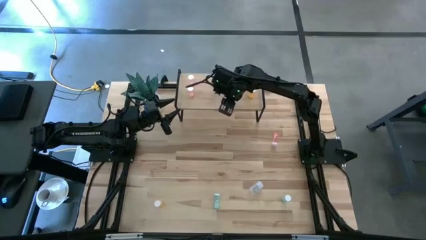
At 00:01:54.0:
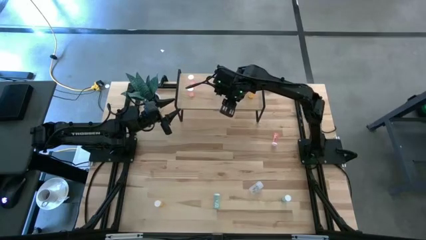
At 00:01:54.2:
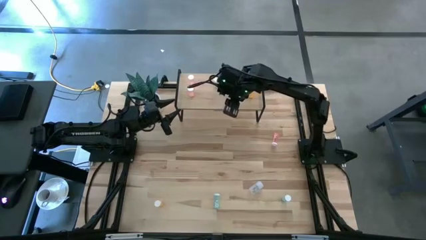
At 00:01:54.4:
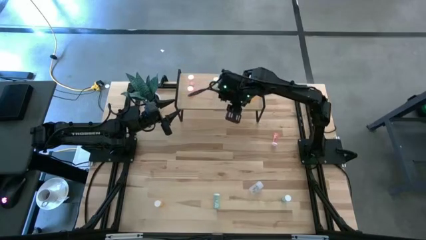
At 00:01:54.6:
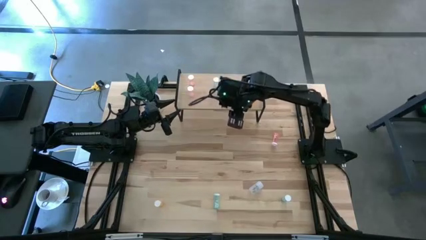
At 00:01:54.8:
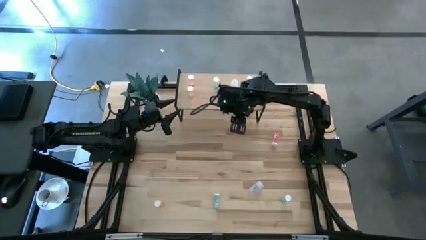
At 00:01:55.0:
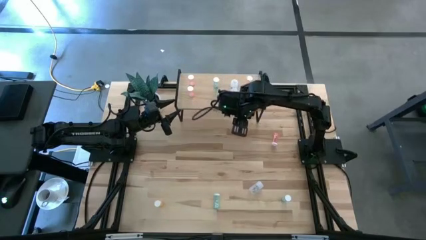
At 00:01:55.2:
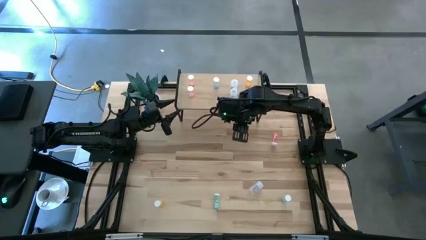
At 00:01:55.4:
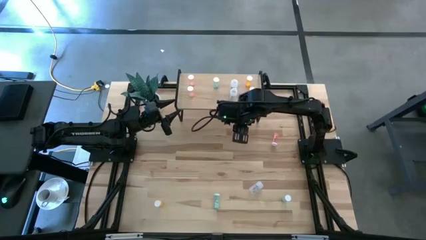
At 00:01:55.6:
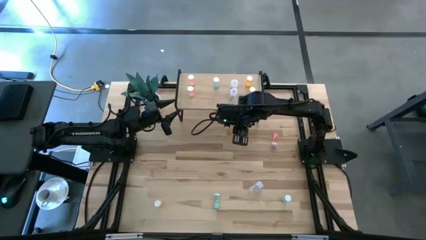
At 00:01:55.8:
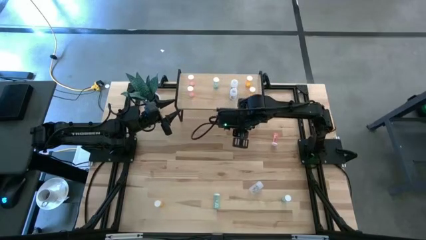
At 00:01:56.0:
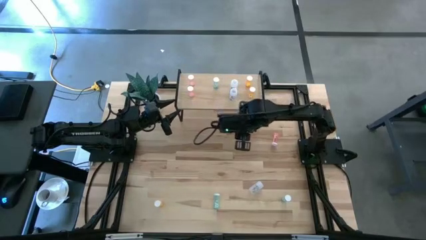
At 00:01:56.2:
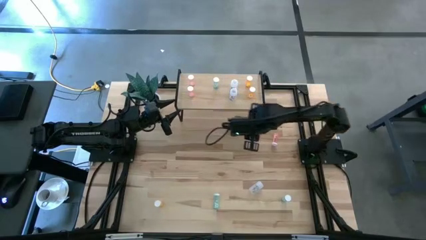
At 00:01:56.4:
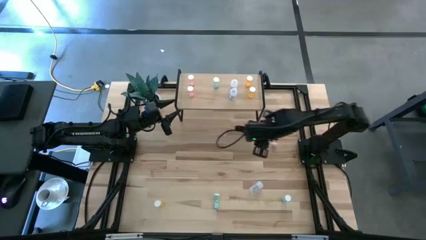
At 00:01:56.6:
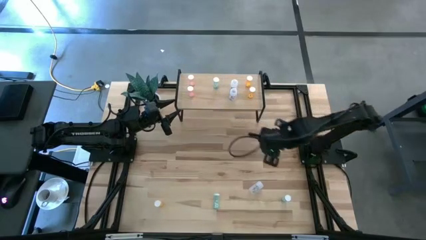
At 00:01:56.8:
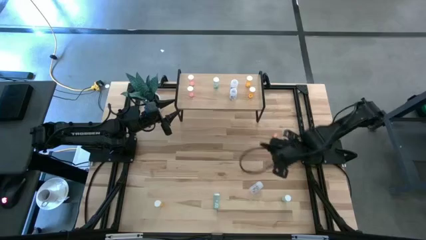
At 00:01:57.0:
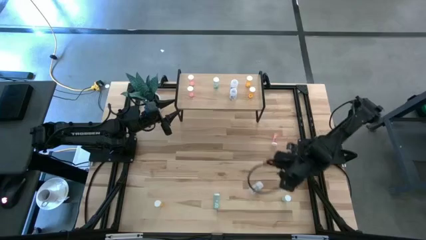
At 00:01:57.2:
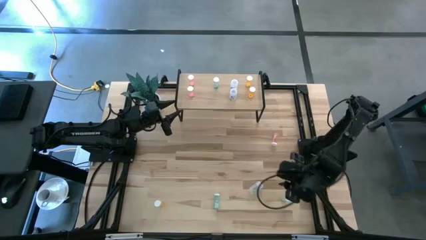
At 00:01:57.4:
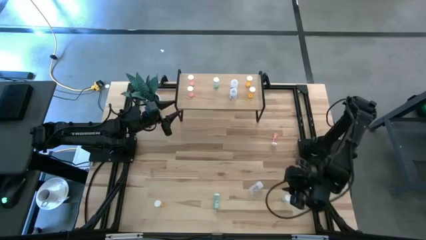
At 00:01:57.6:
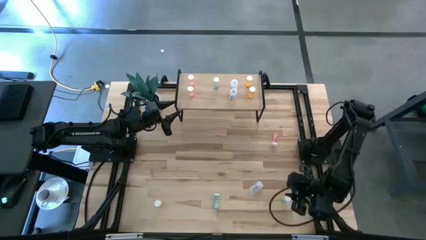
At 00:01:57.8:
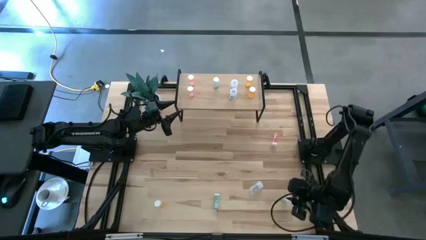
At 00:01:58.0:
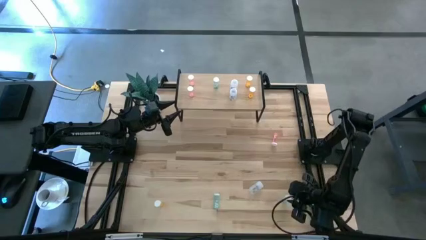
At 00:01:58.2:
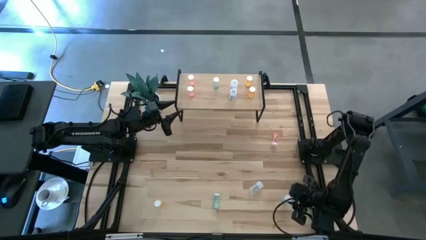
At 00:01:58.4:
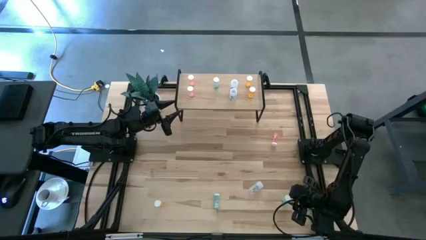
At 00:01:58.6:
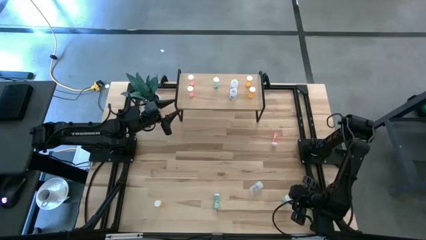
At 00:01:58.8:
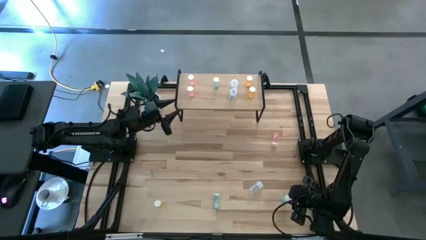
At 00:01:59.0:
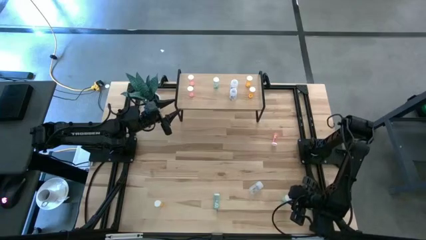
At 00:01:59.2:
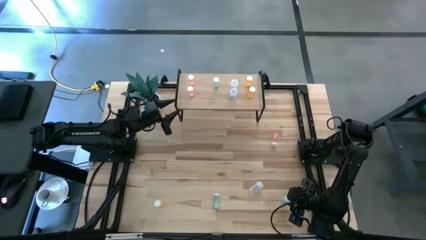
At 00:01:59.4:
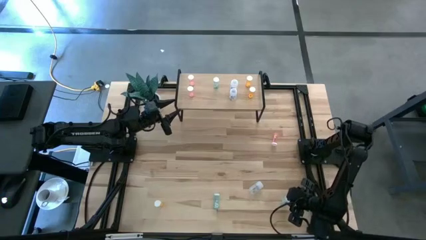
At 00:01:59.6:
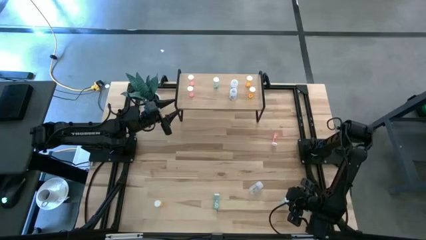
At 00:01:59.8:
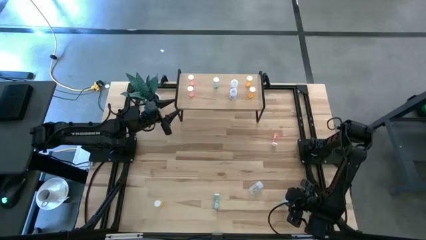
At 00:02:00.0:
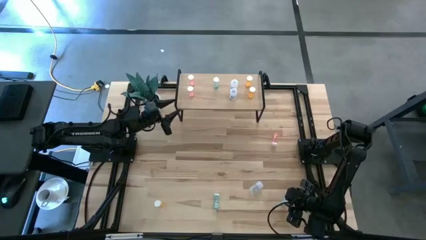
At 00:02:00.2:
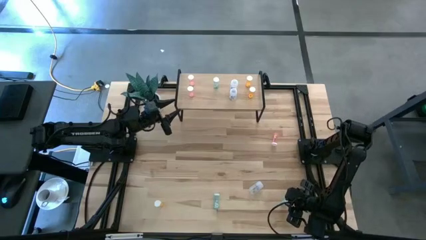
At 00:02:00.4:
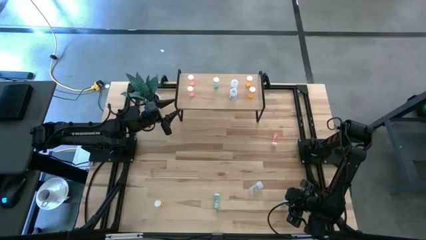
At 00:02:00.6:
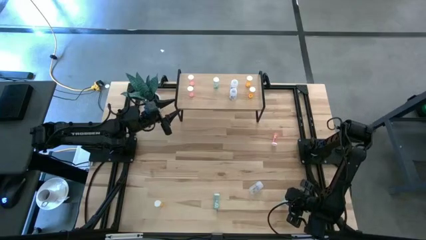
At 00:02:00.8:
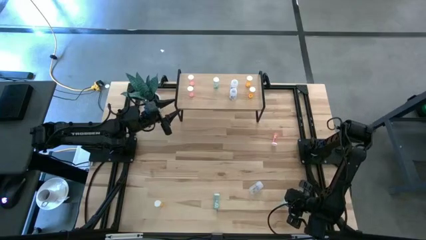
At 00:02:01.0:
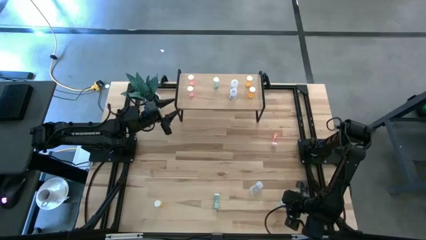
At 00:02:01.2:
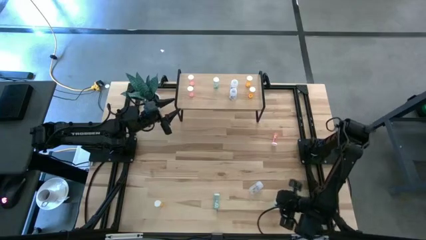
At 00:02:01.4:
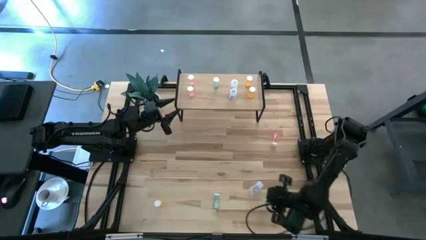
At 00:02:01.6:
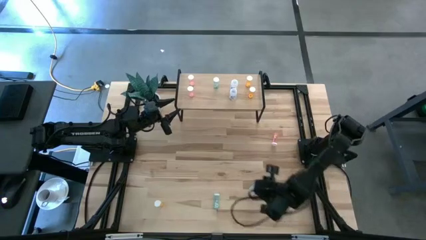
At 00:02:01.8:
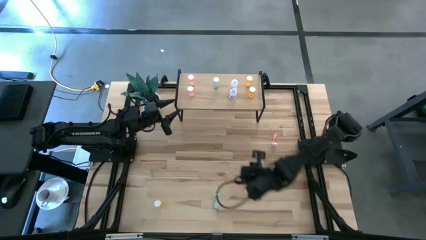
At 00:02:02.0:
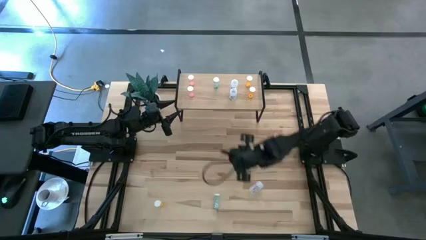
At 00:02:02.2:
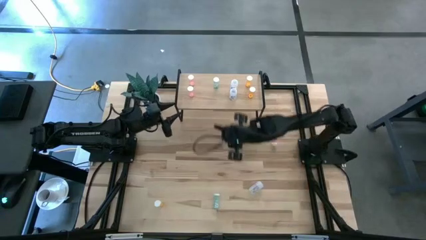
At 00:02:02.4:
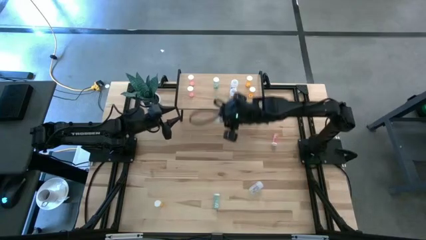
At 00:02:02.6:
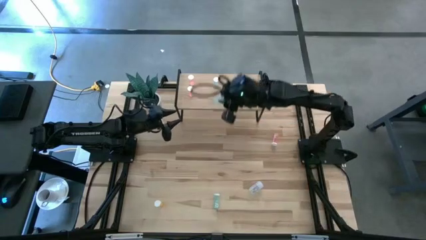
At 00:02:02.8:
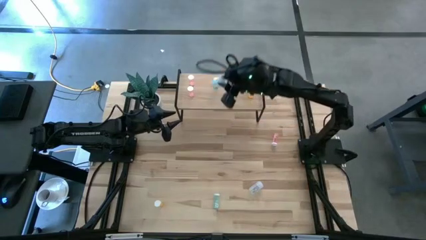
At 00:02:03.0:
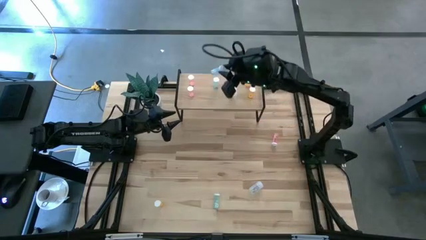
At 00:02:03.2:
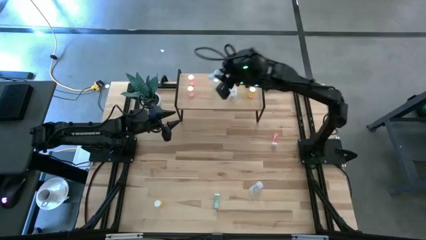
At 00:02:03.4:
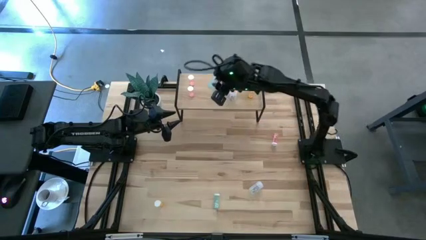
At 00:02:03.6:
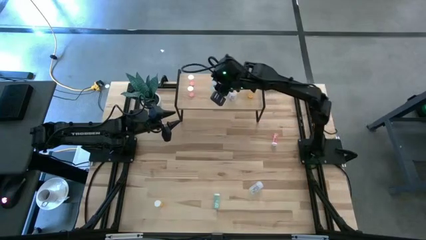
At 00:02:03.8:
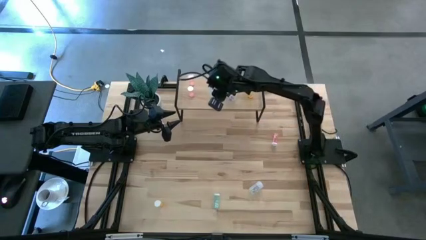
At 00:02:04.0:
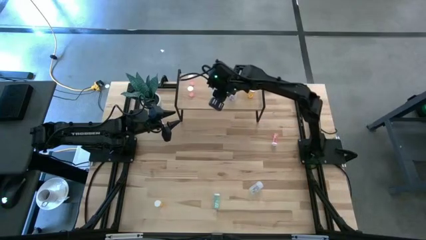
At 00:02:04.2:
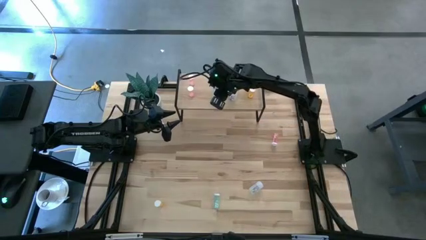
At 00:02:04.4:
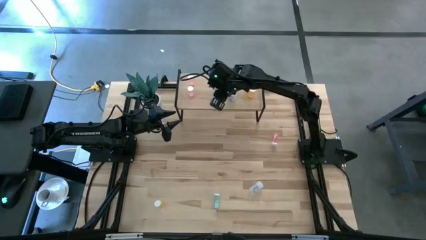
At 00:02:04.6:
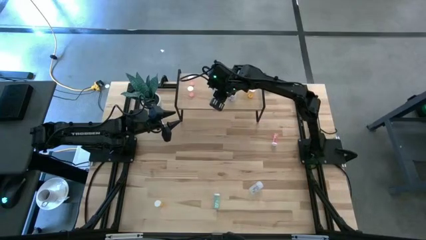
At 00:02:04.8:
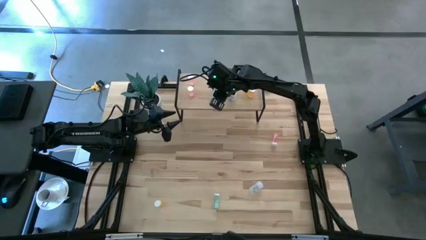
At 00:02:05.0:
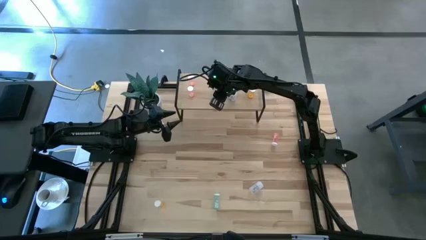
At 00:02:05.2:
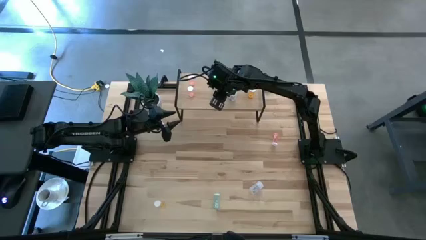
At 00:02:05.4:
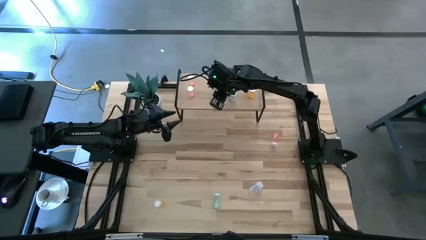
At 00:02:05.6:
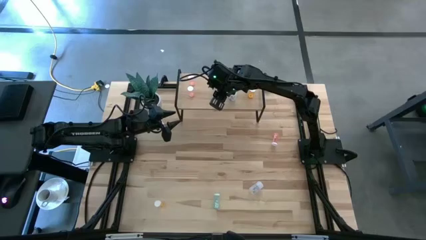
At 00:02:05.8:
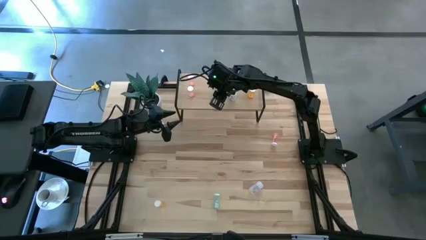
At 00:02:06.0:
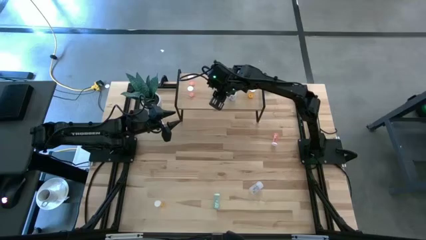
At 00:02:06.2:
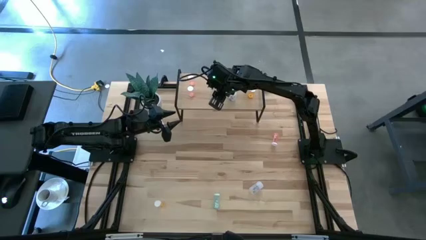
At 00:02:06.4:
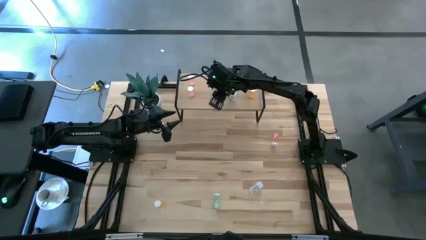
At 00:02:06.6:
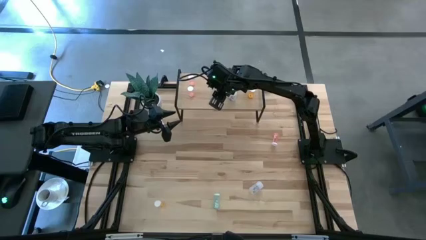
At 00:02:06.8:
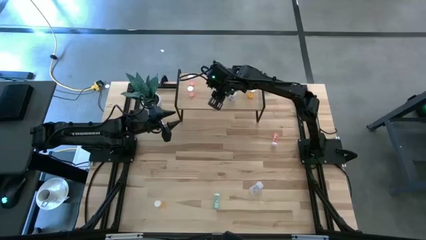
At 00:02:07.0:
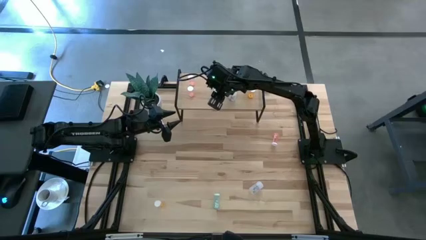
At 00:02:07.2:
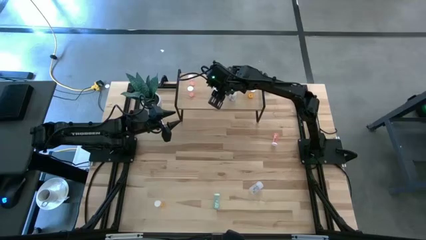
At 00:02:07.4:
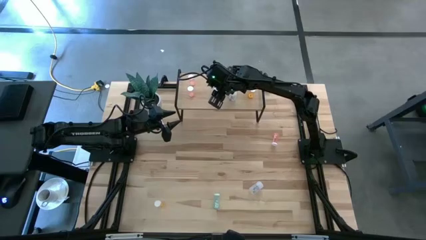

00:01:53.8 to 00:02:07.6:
Task: Pick and place medicine bottles onto shelf by color
Put the right blue pill bottle aligned with the other blue pill bottle on the shelf
